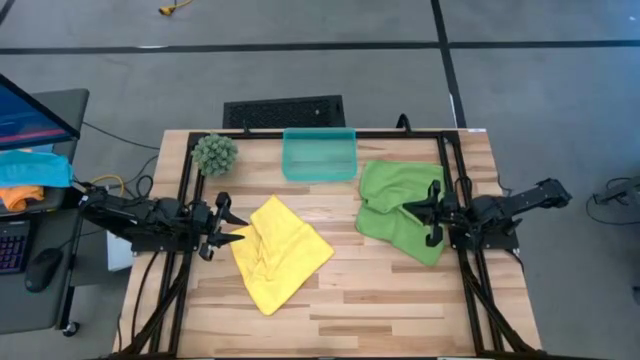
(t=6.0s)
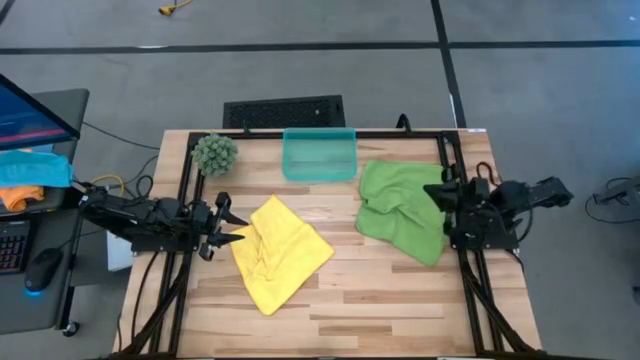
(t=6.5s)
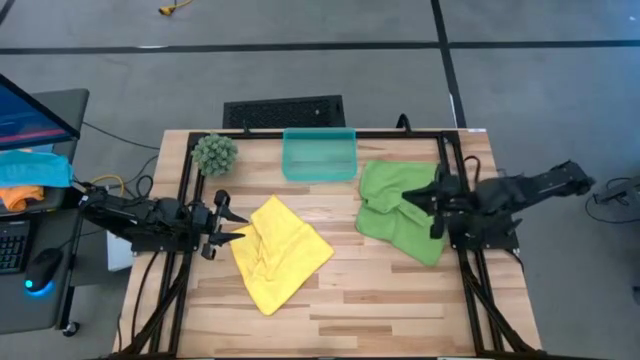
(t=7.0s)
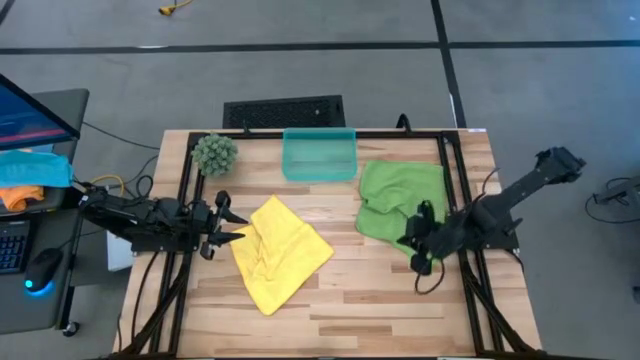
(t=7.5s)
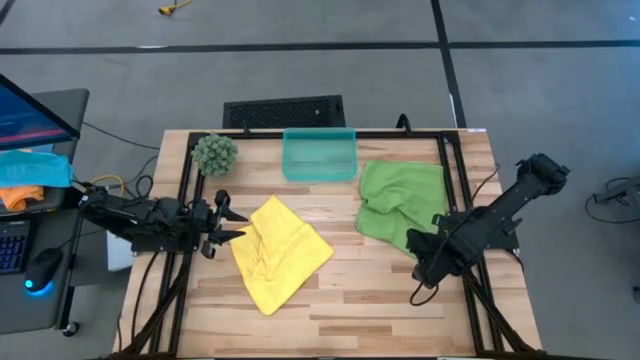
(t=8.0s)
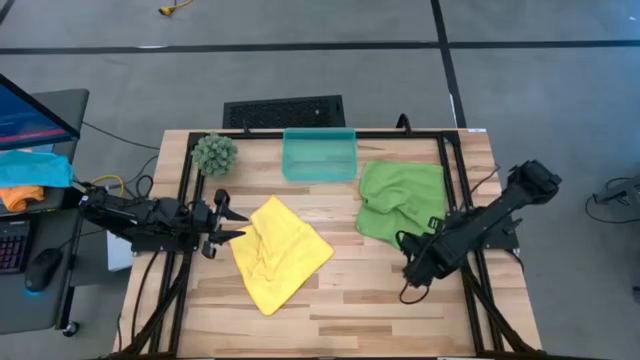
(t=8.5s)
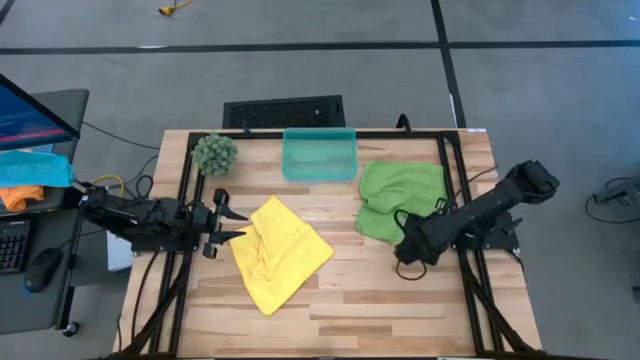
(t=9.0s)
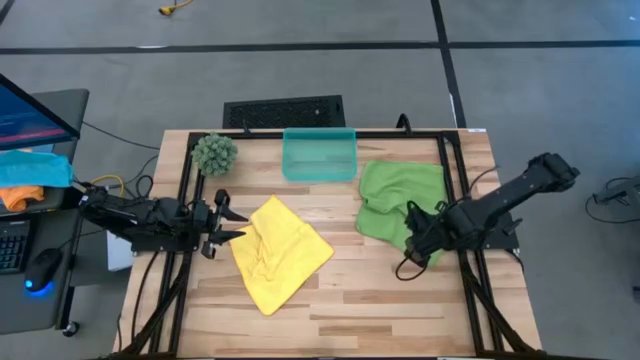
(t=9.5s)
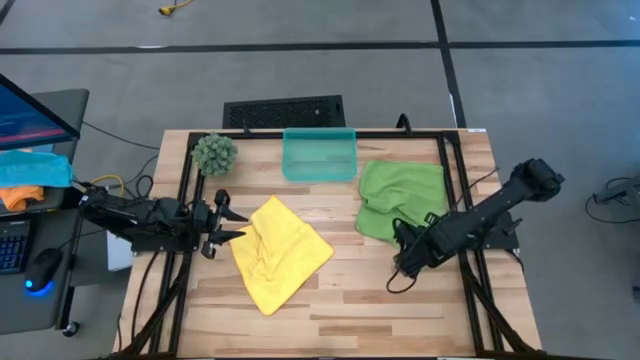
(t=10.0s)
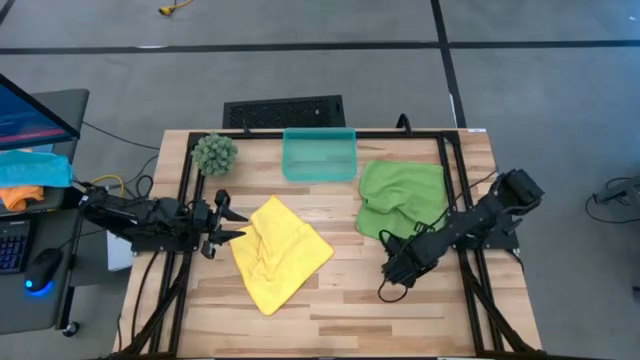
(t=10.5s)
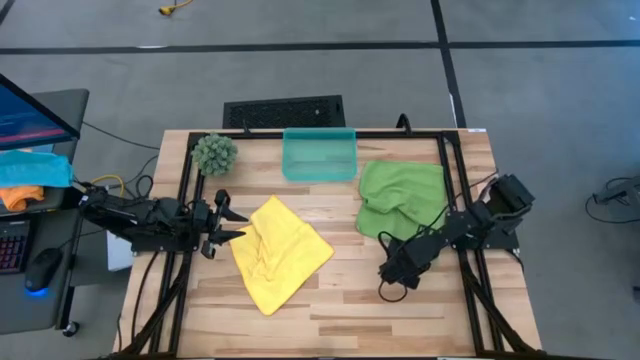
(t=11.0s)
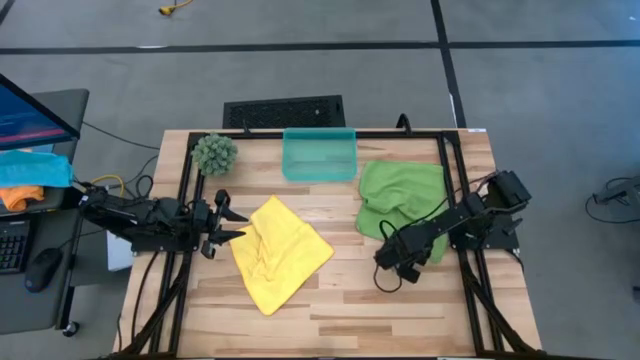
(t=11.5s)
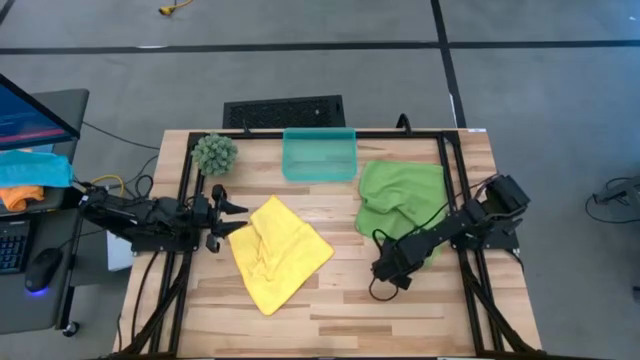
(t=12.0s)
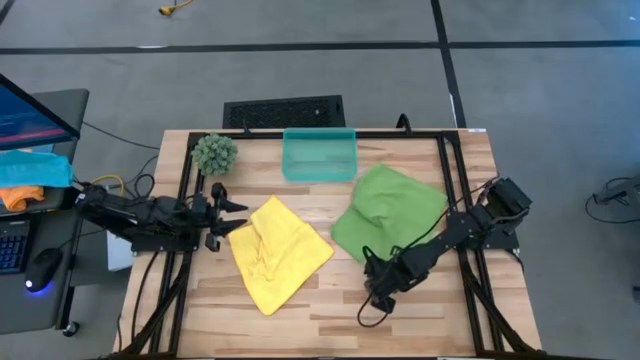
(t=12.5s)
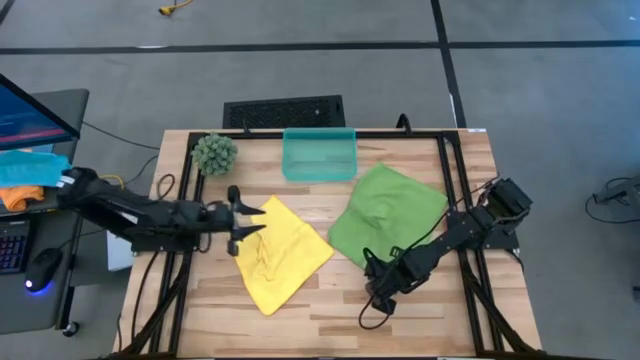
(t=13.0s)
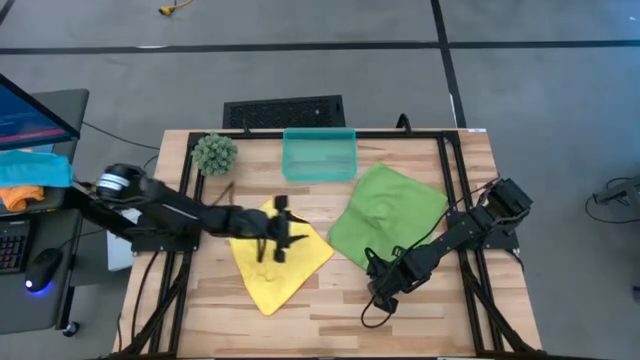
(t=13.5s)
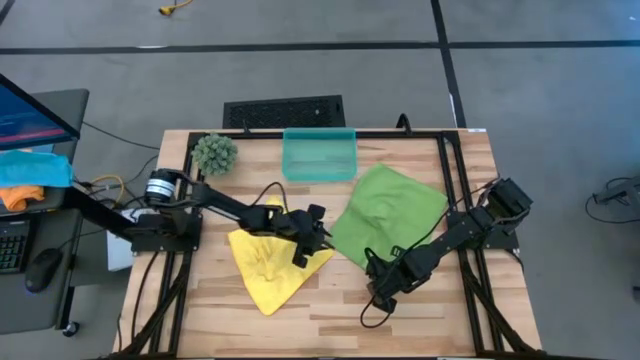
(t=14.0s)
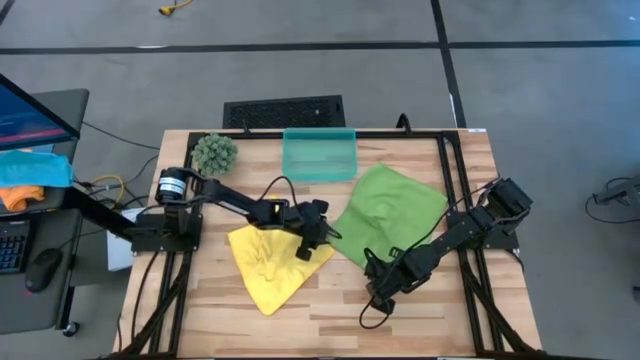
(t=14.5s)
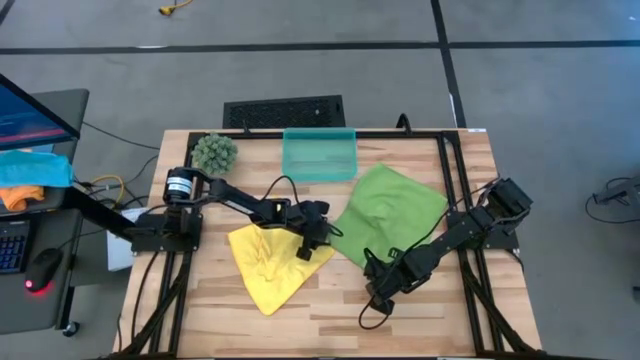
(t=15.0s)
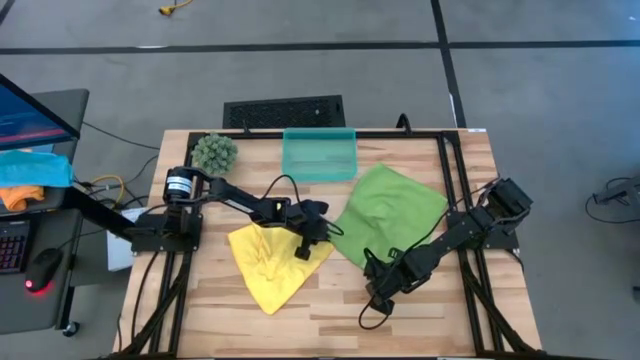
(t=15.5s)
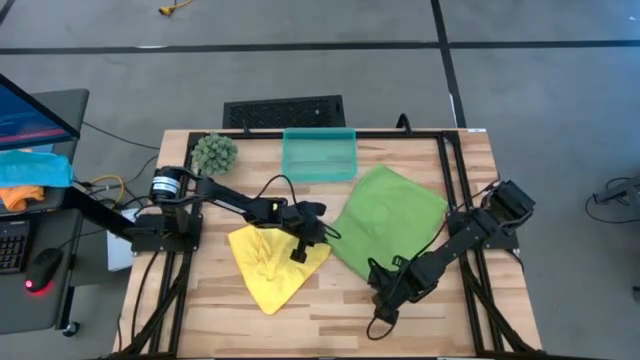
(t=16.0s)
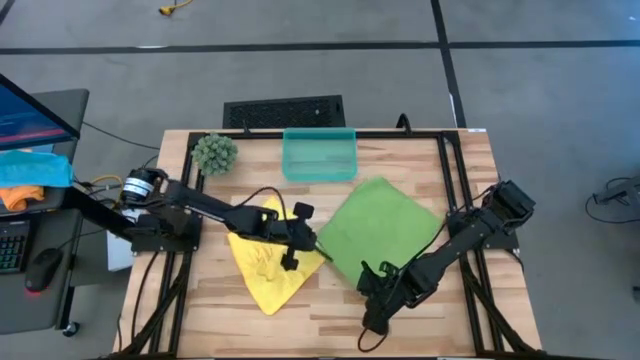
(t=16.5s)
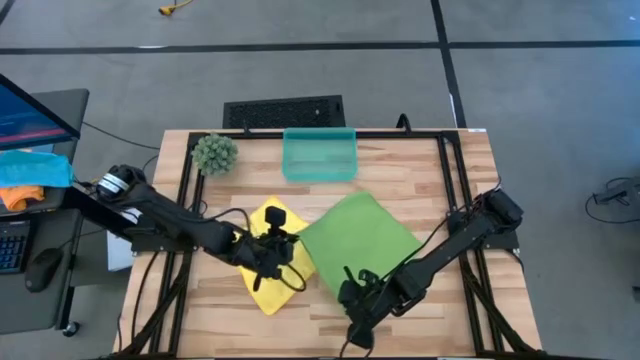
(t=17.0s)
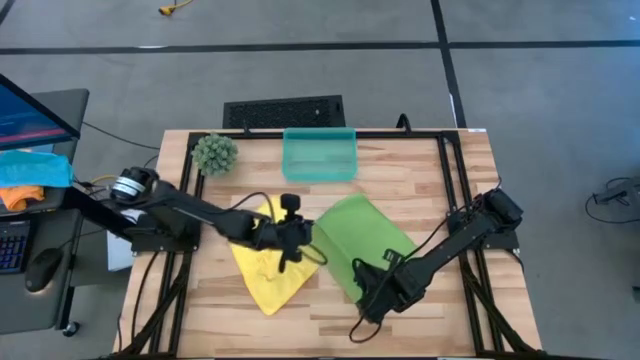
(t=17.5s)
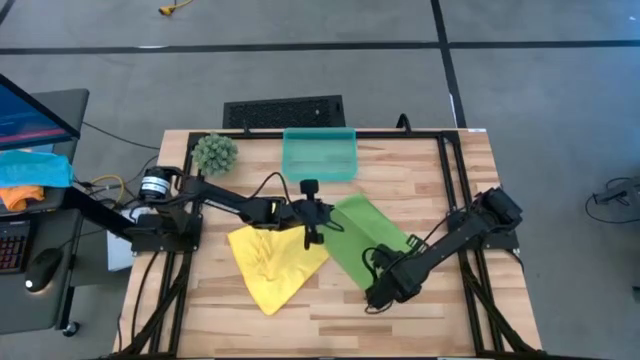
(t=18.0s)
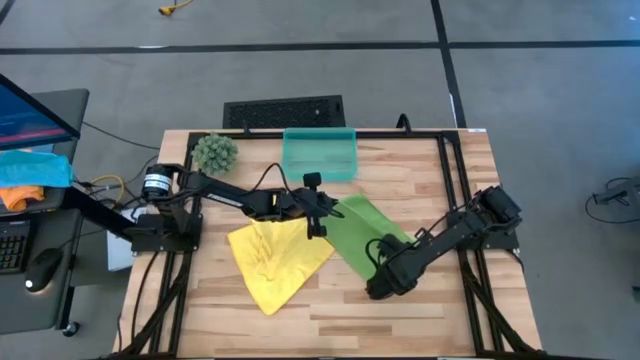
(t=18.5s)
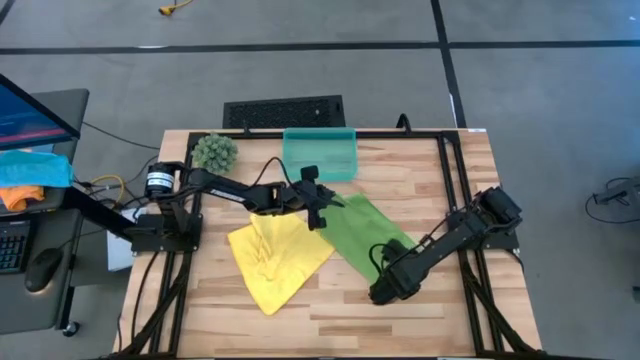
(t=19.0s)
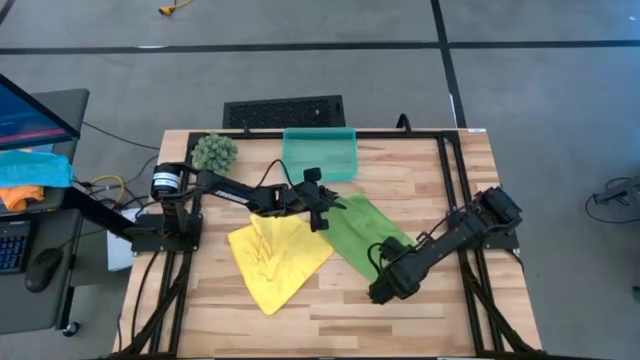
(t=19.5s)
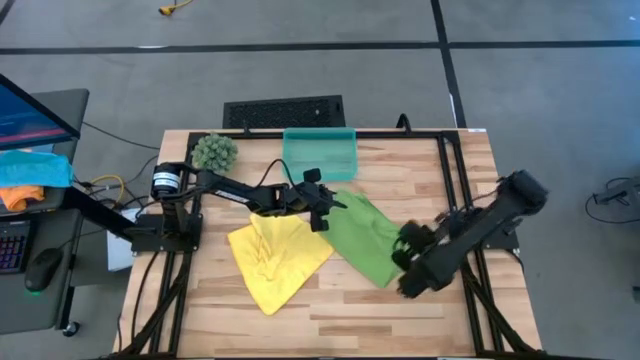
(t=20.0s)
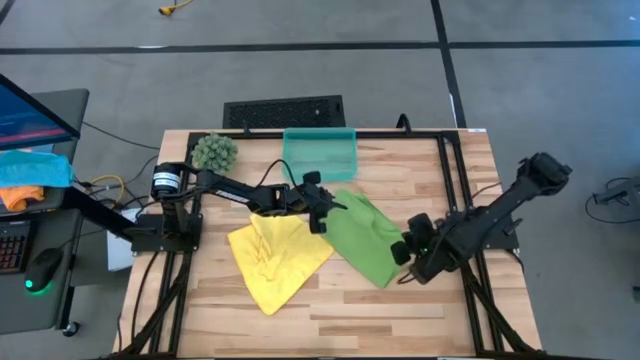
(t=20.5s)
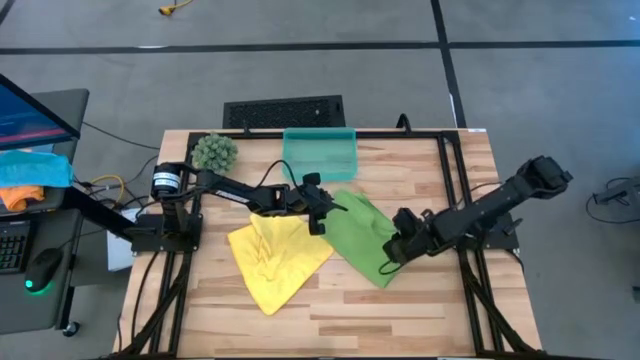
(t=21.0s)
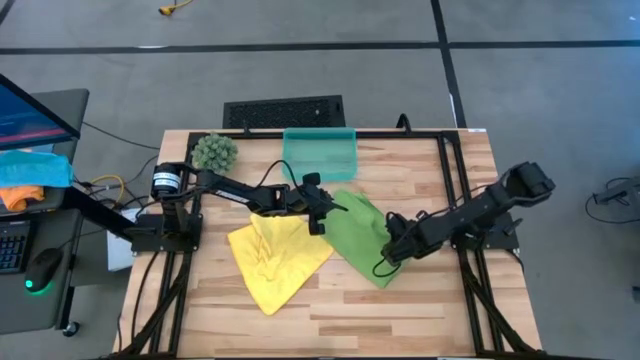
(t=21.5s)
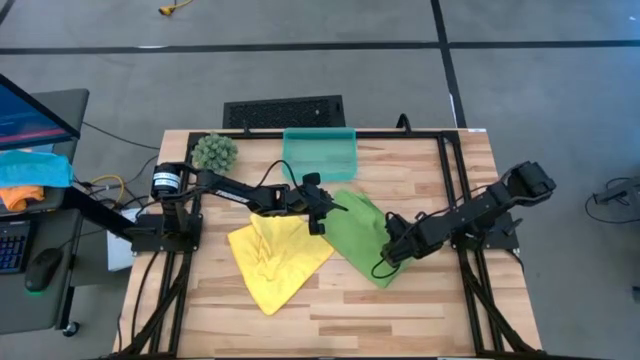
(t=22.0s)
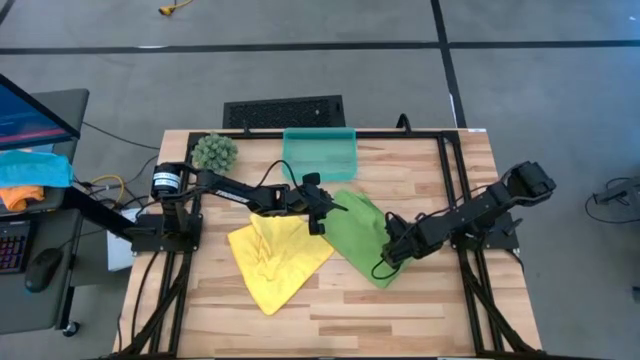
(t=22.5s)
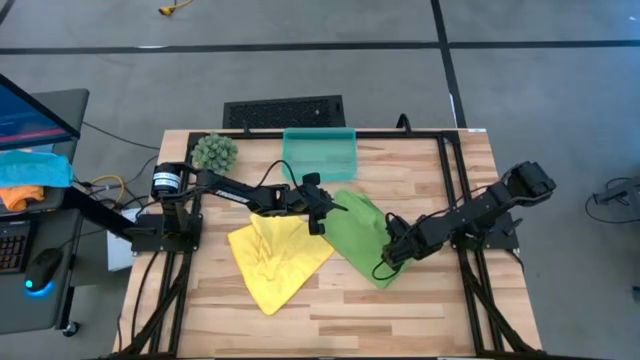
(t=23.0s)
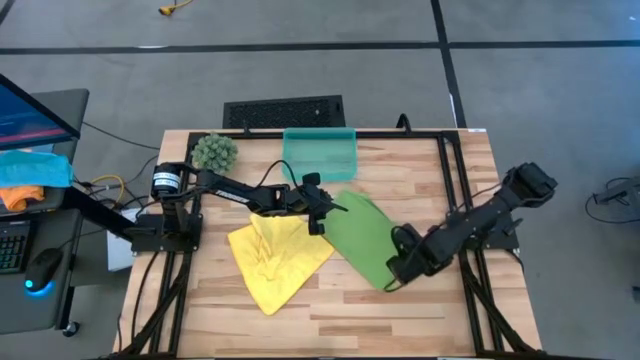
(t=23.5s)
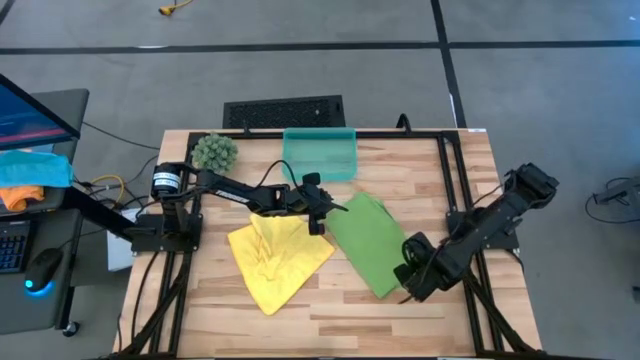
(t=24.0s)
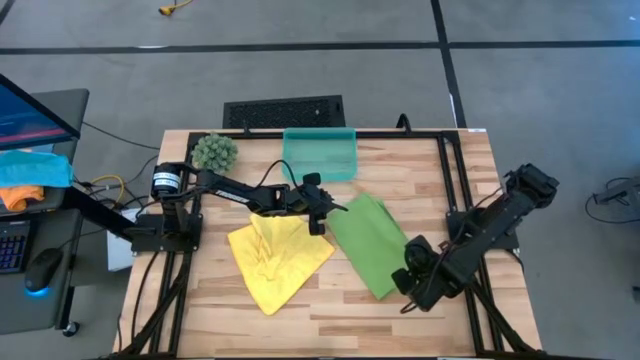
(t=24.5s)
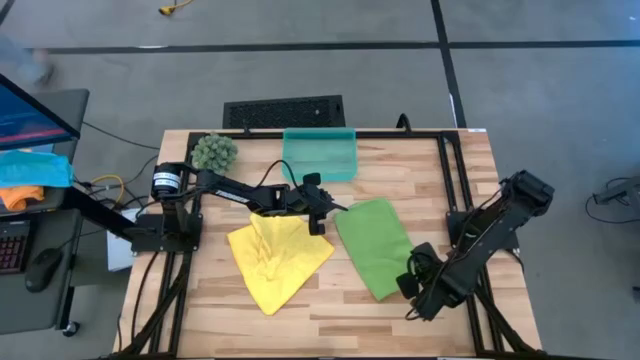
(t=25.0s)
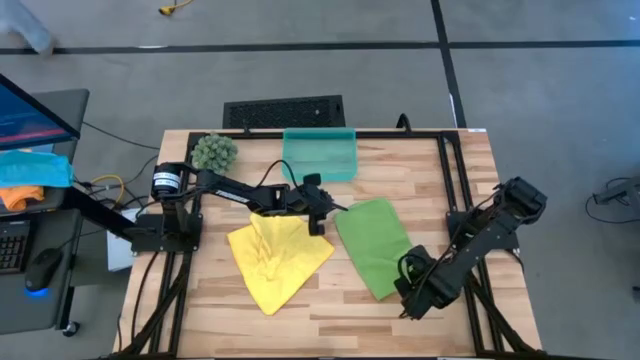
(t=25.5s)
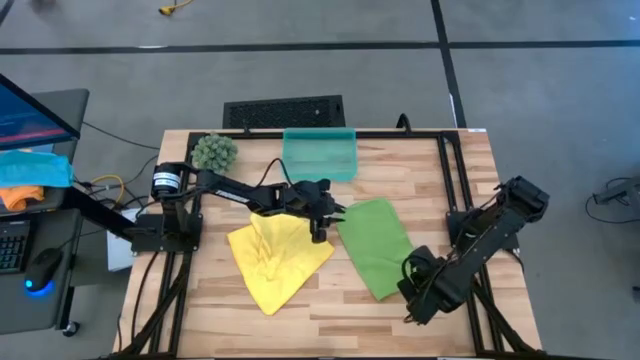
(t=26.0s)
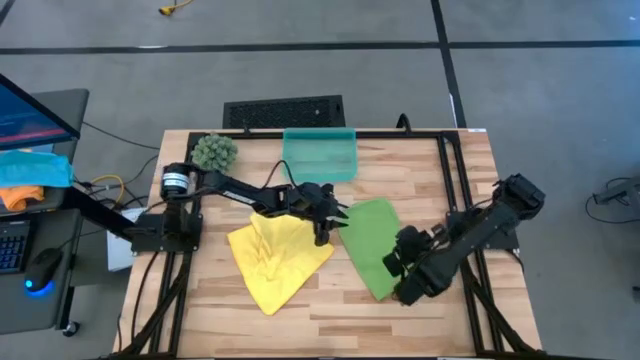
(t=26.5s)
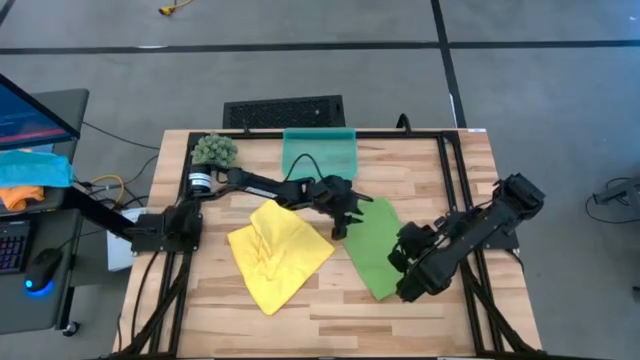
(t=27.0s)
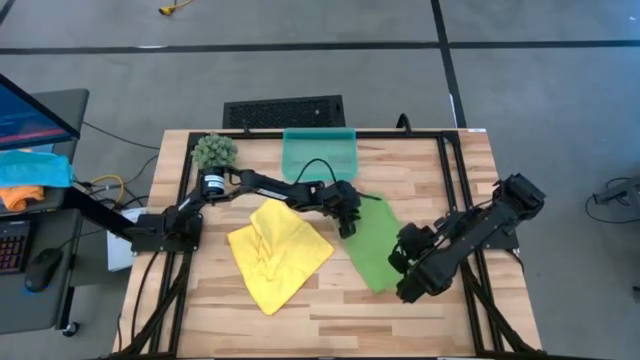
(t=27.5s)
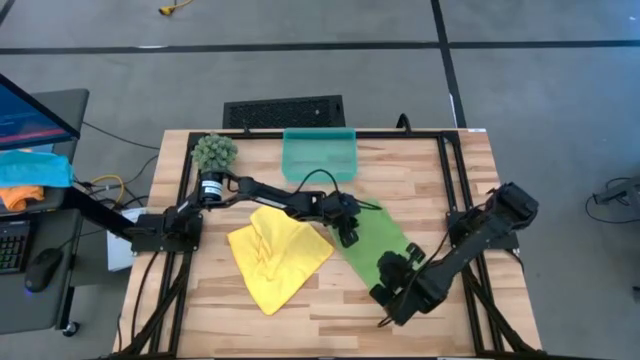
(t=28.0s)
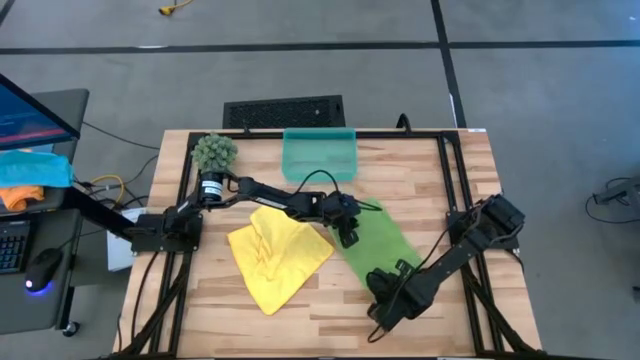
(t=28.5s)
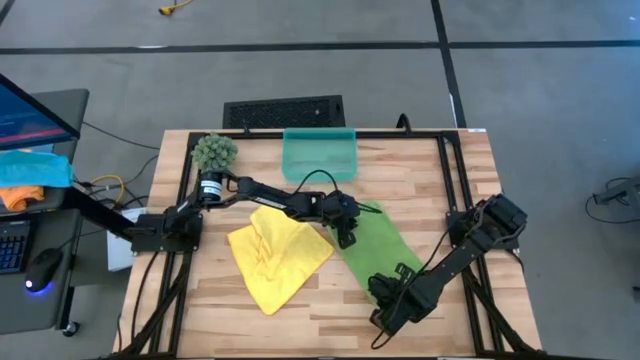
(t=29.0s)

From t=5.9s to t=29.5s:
Task: Roll microfiber towels into tight, uniform cylinder then place into a basket
Fold the green microfiber cloth
